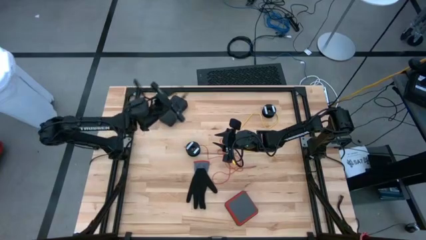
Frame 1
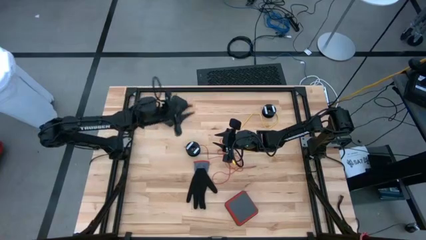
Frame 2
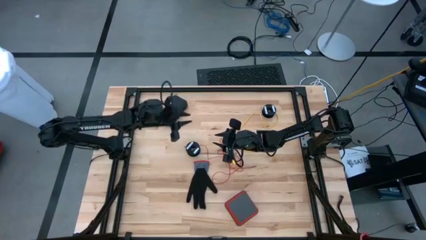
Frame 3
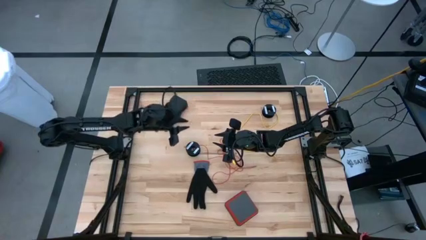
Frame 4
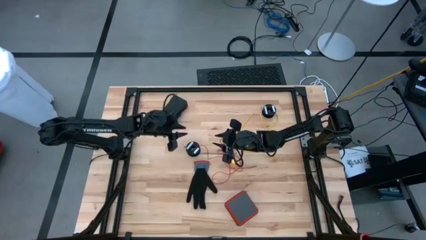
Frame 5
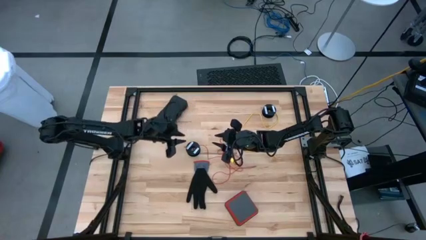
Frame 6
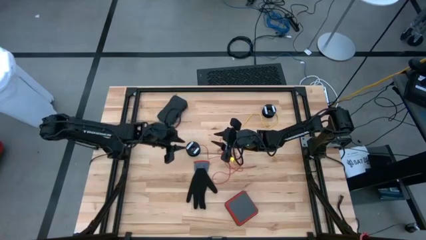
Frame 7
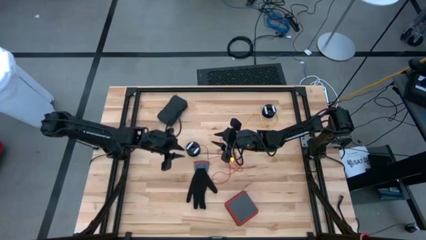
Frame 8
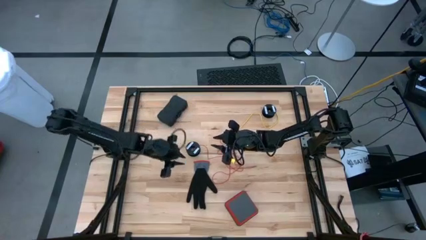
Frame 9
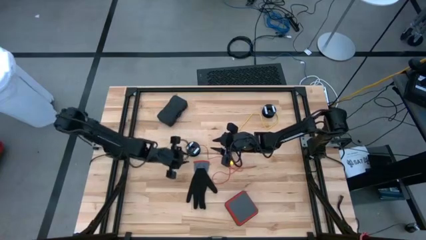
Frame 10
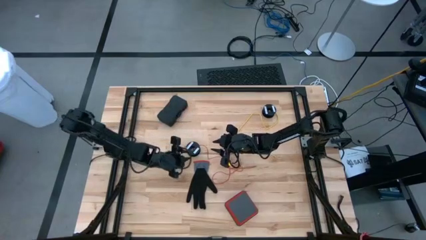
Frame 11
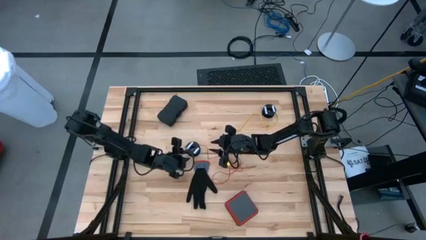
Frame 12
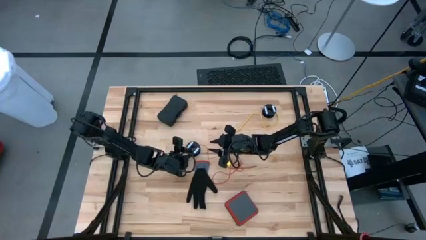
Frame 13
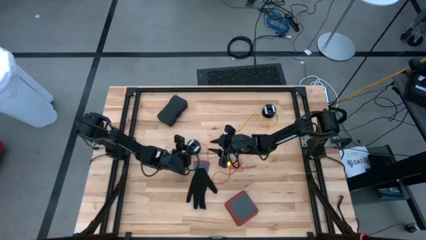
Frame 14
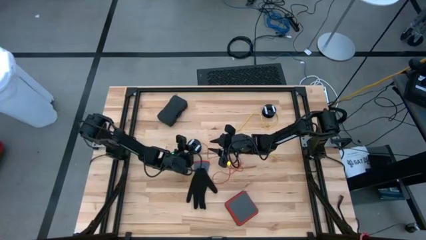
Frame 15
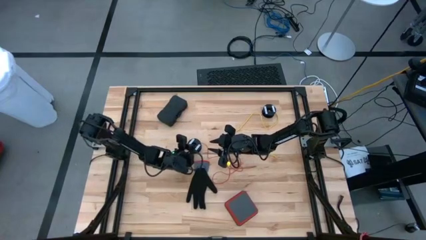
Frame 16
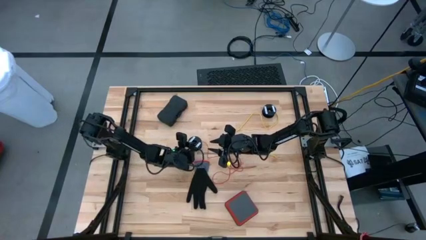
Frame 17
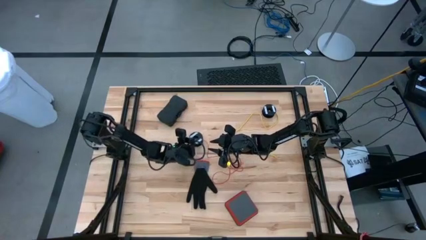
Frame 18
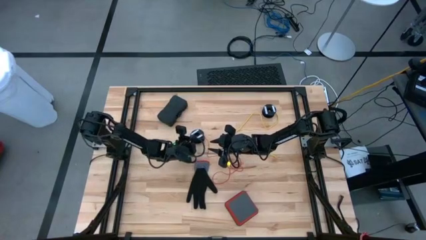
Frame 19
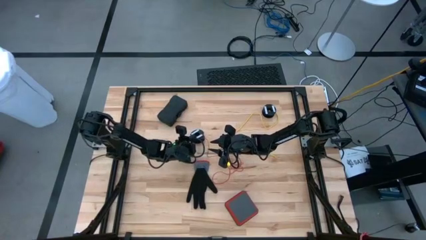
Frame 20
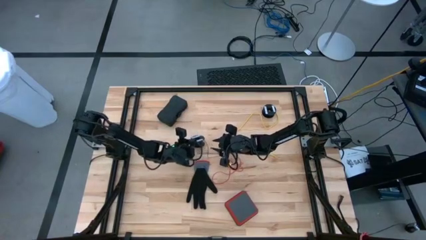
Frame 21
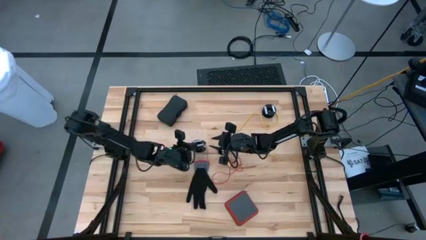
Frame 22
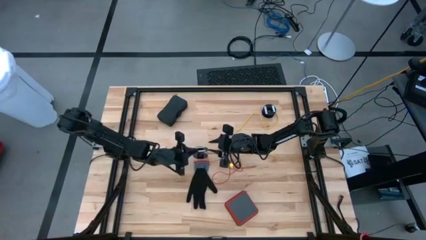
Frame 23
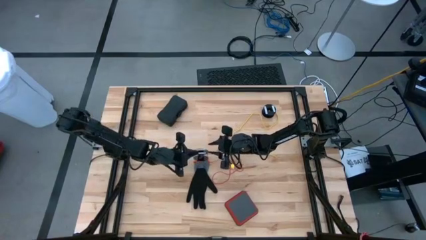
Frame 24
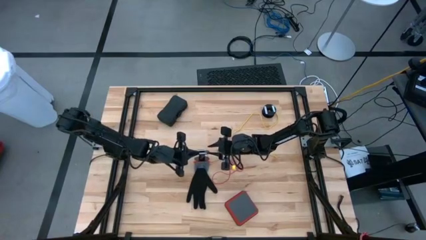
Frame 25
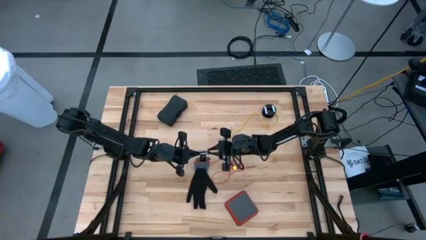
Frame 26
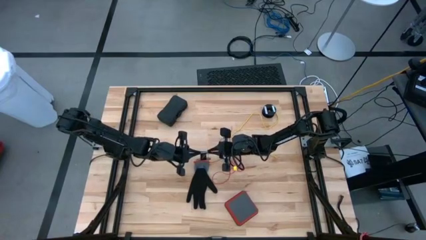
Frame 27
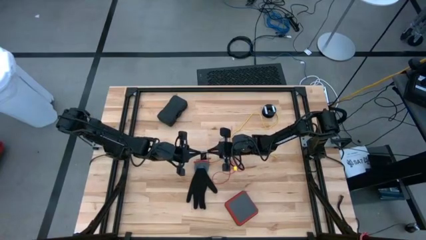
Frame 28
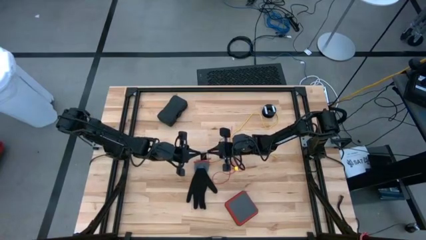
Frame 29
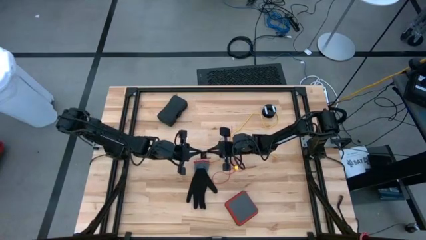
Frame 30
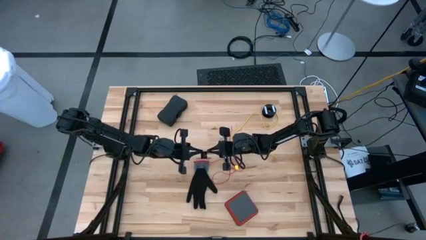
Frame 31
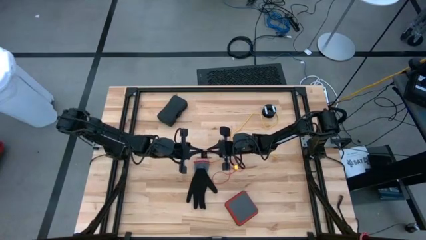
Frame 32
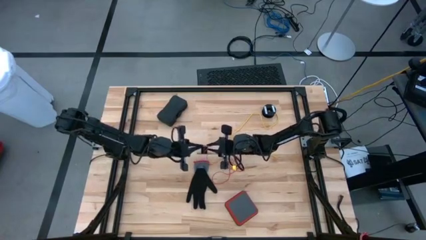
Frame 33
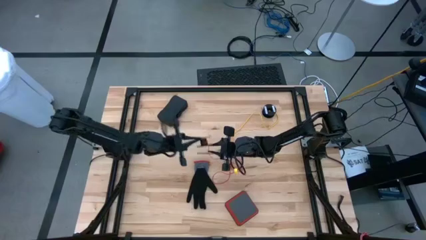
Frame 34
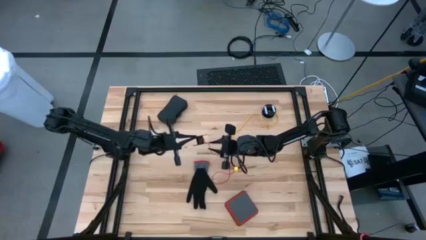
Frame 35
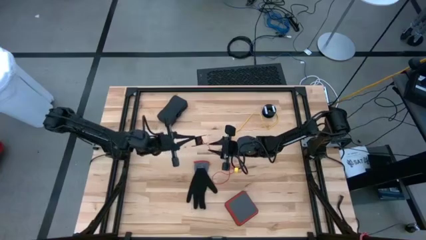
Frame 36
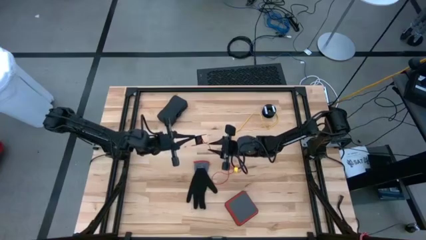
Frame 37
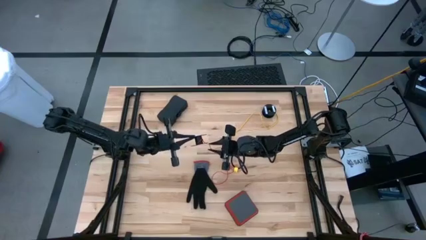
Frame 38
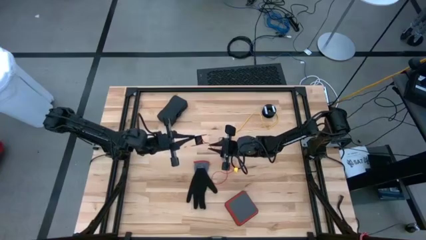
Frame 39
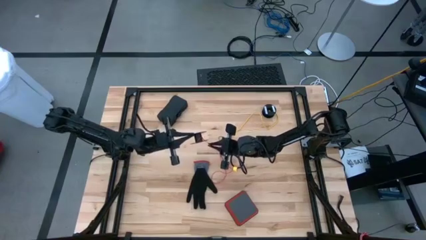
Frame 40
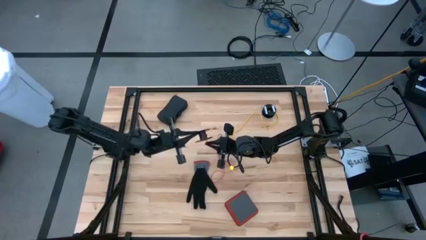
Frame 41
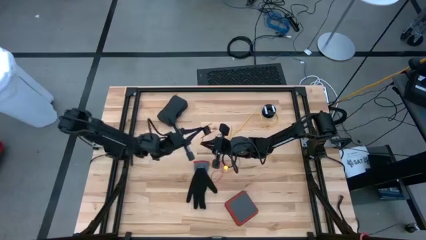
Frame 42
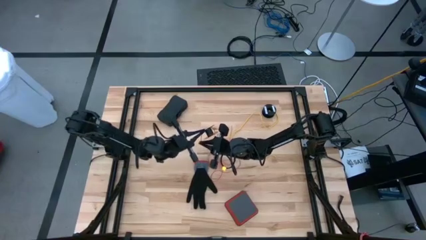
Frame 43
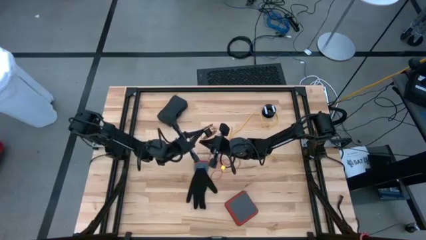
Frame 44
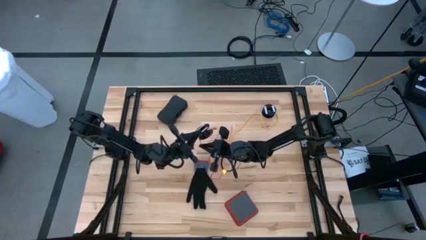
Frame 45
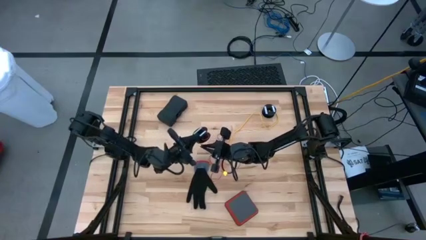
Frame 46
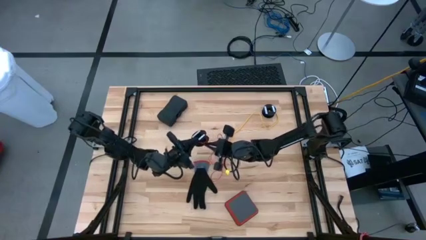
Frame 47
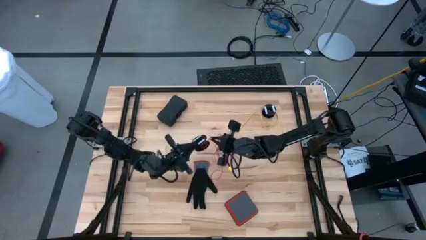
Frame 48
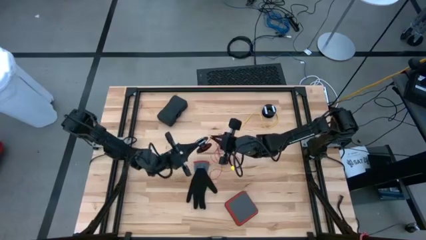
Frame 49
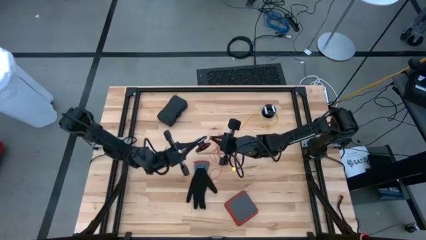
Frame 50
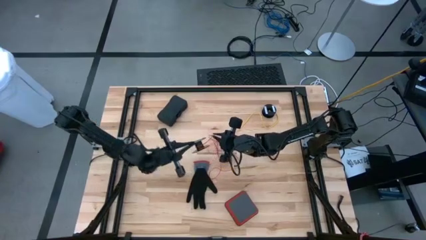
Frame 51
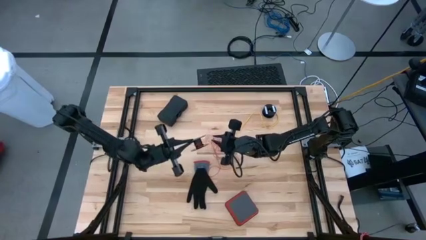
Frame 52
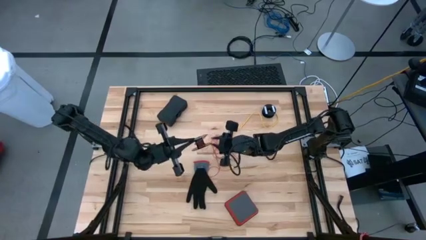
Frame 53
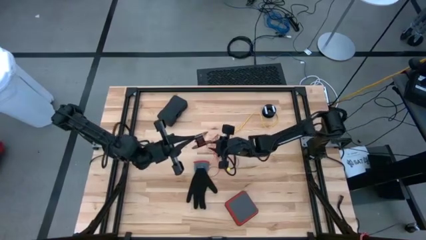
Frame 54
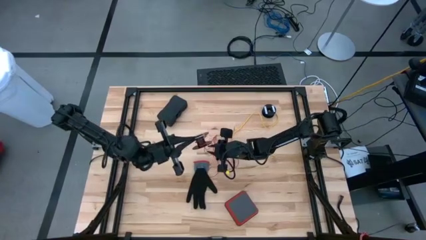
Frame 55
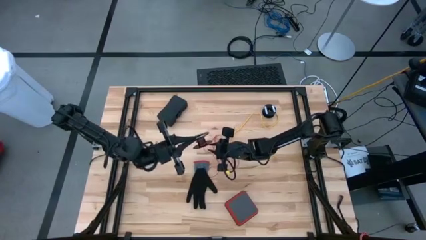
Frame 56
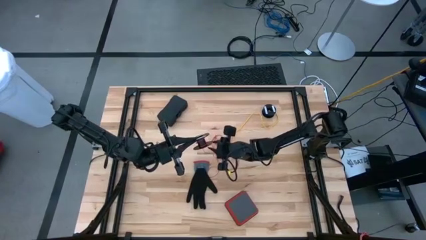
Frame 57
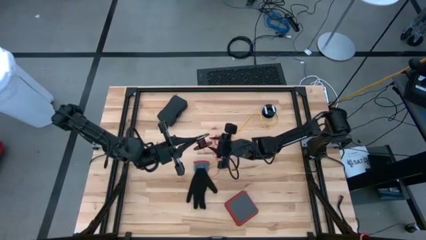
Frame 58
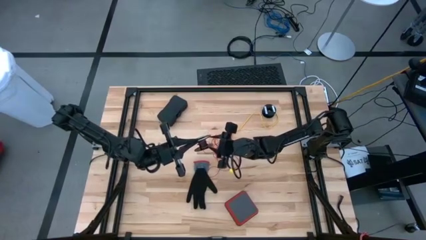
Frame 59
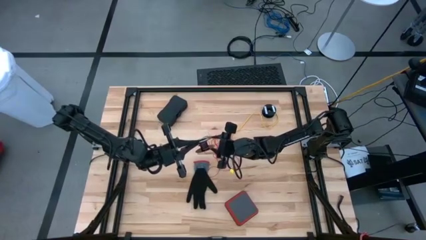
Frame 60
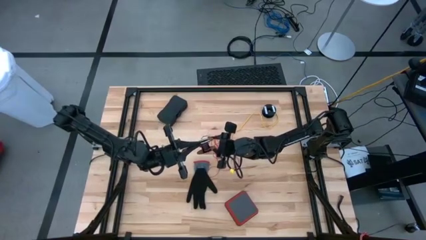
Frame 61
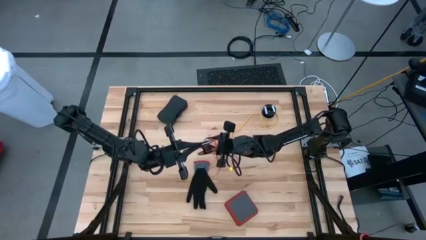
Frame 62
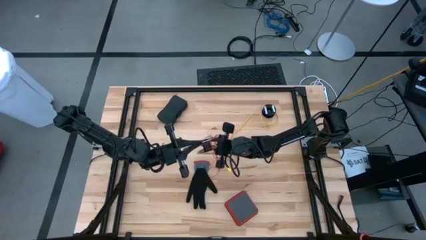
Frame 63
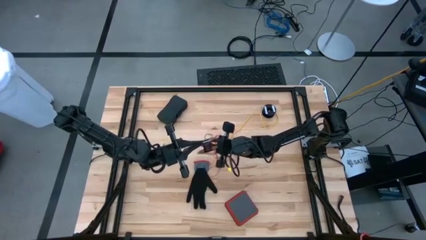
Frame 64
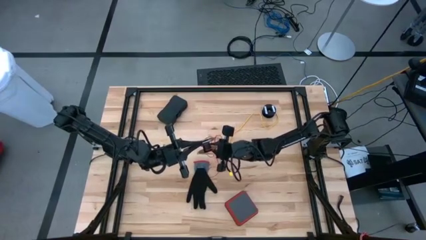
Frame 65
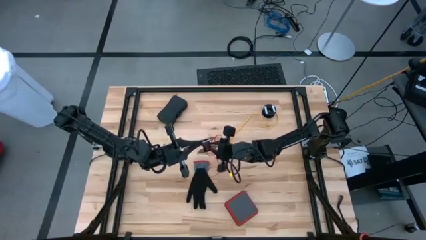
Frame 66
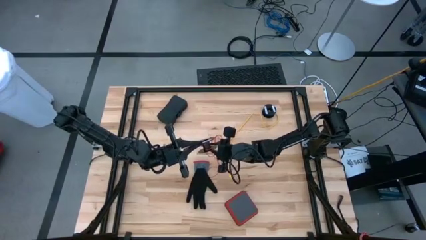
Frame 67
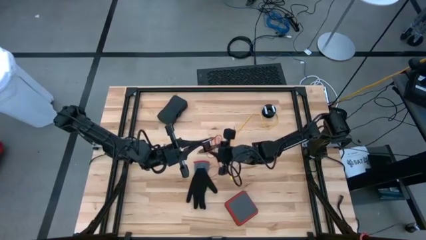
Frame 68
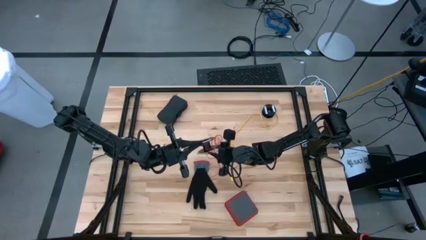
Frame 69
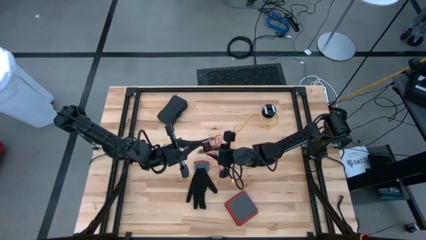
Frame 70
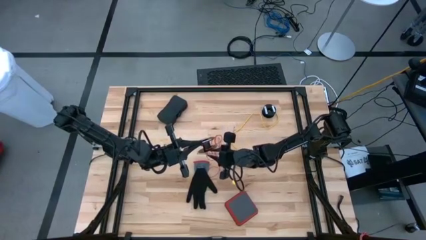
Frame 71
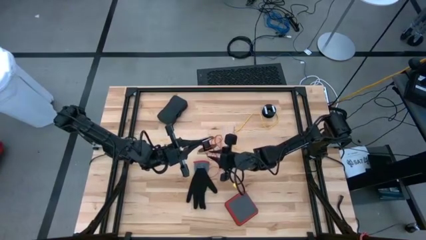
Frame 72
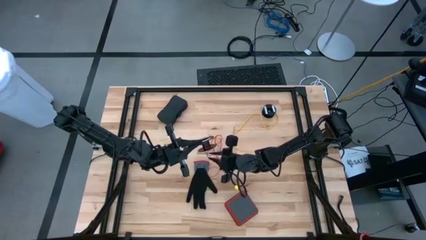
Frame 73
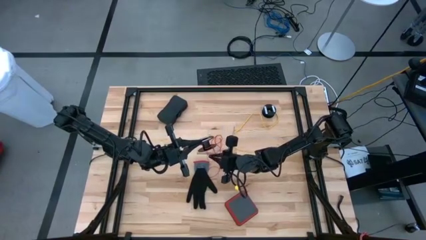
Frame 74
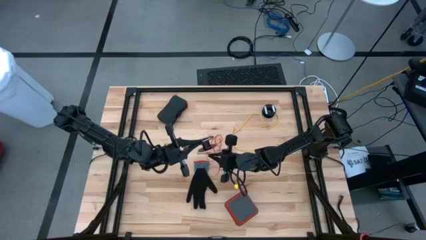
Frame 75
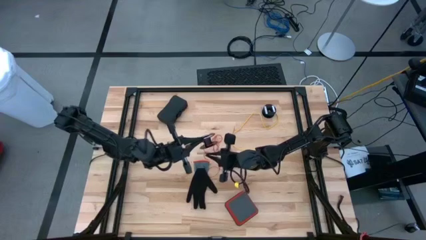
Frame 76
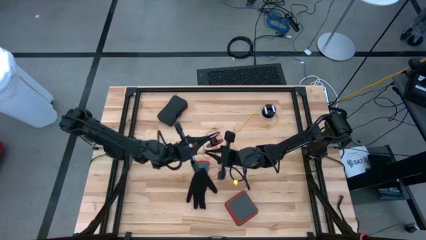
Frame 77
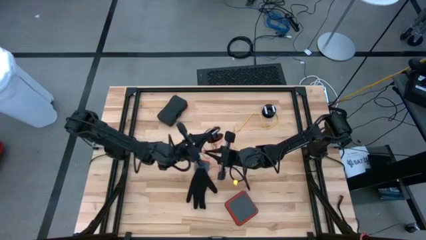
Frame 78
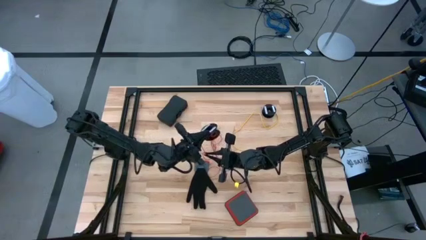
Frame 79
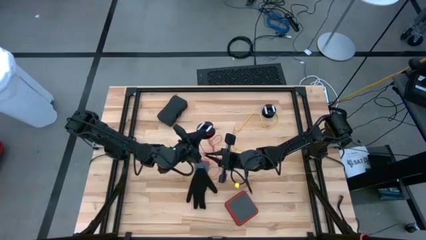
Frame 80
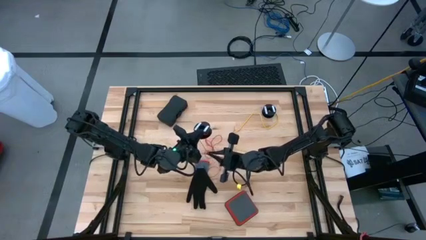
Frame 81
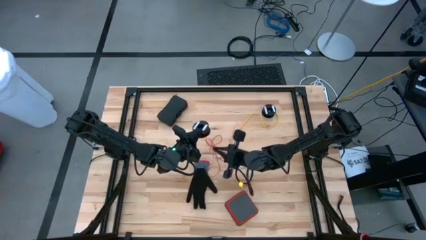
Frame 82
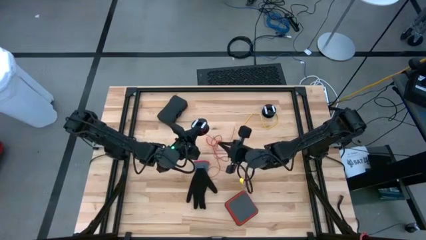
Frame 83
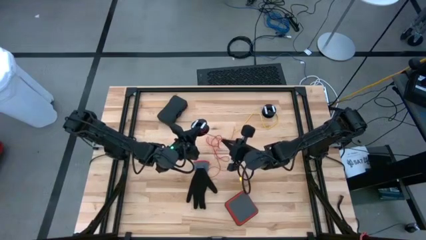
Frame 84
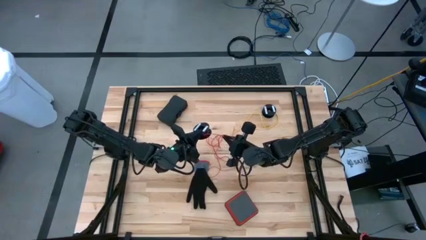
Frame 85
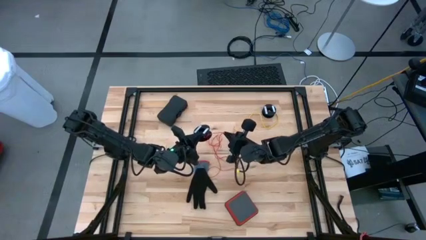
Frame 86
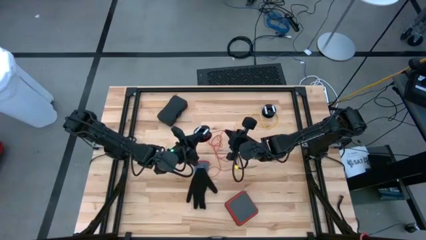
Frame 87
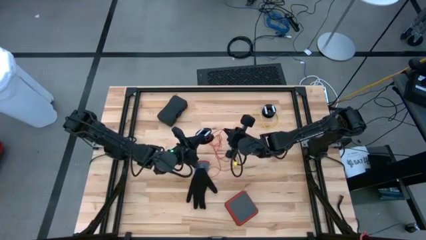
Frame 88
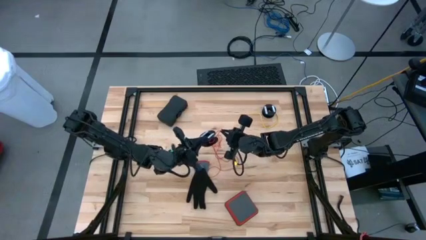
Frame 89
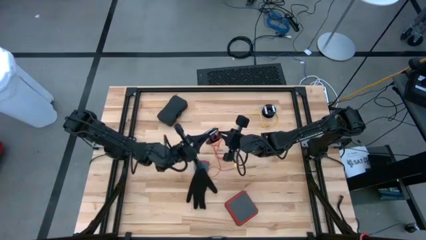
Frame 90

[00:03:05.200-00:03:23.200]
Task: Coil cords
Coil the red wire onto the black spool
